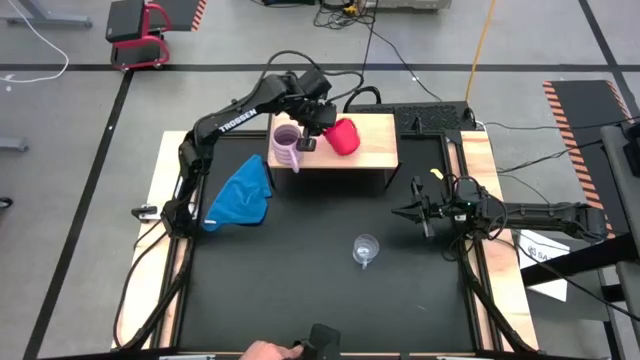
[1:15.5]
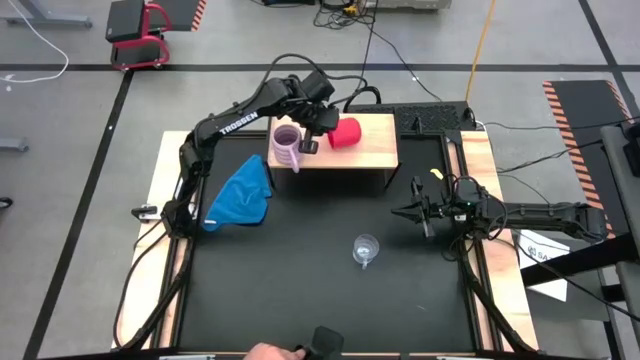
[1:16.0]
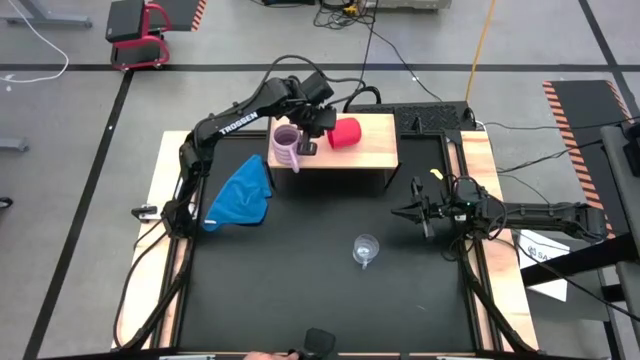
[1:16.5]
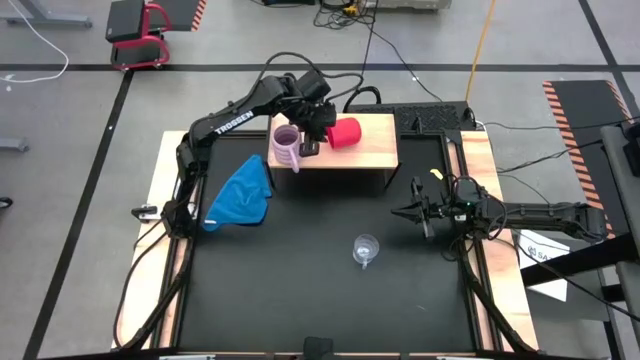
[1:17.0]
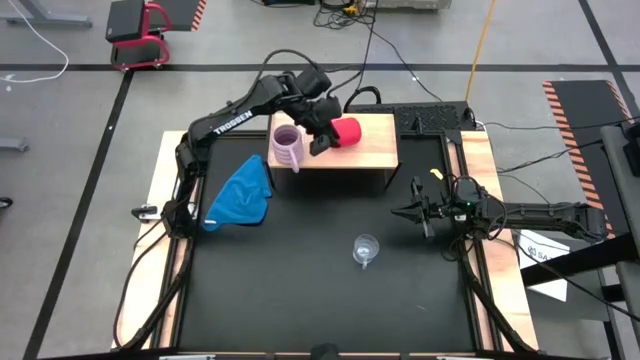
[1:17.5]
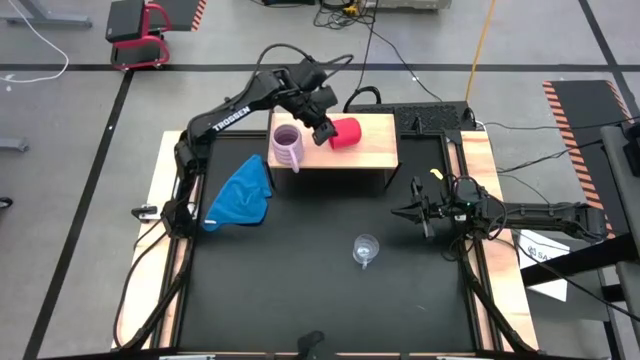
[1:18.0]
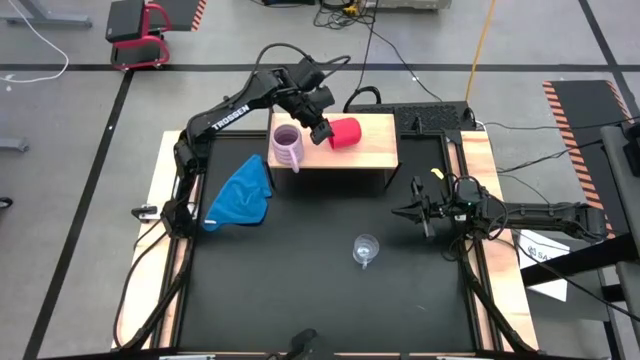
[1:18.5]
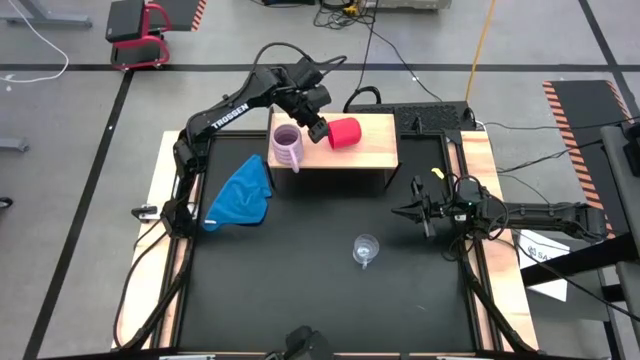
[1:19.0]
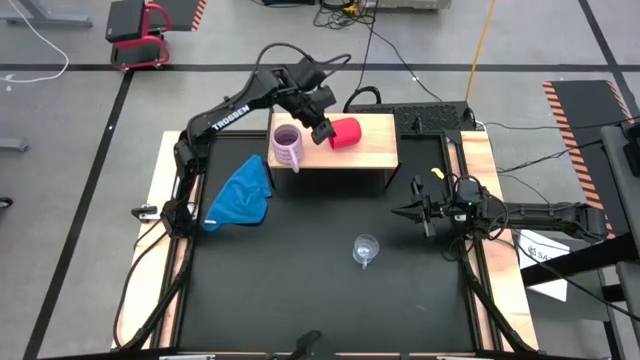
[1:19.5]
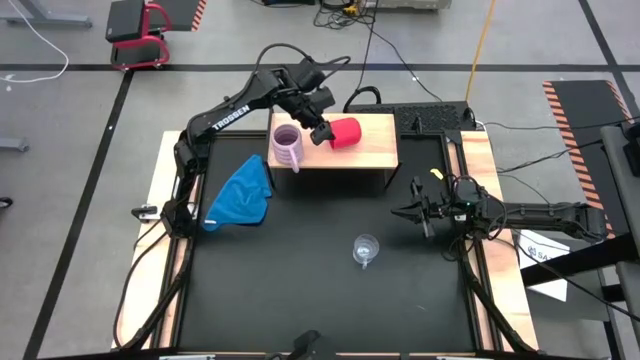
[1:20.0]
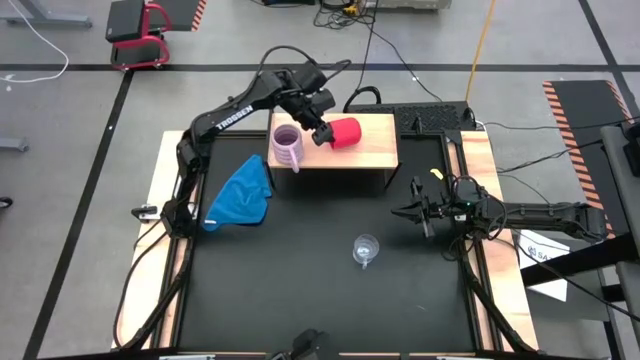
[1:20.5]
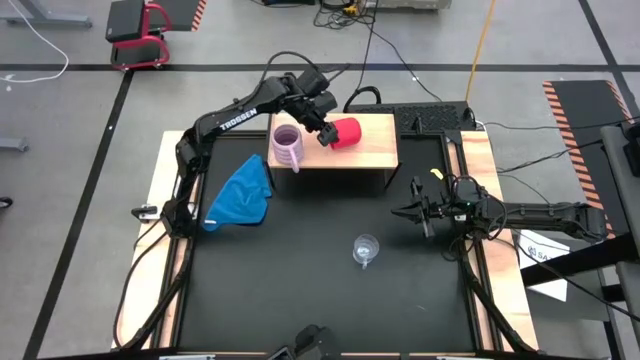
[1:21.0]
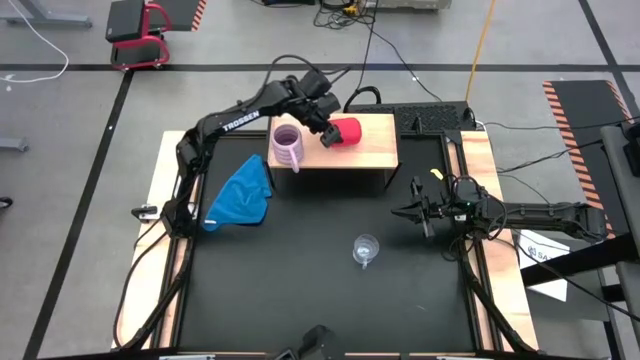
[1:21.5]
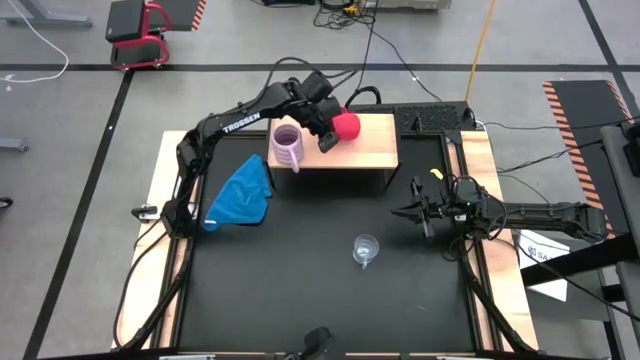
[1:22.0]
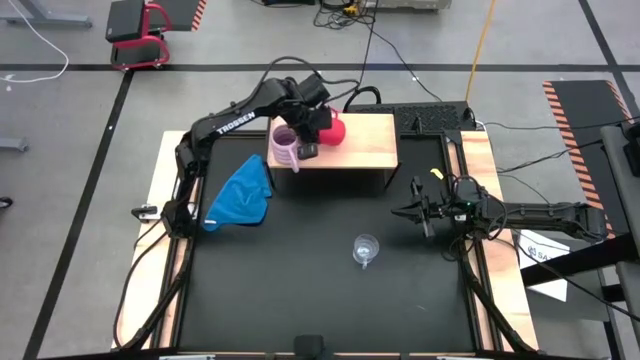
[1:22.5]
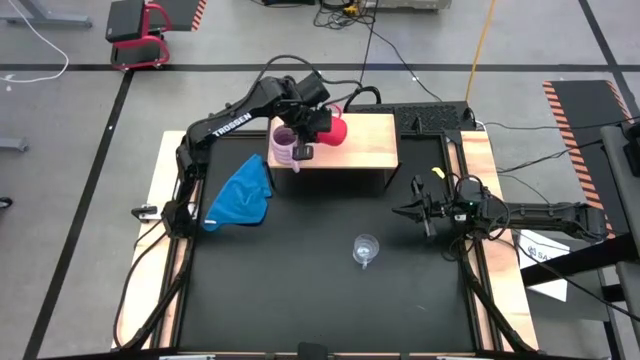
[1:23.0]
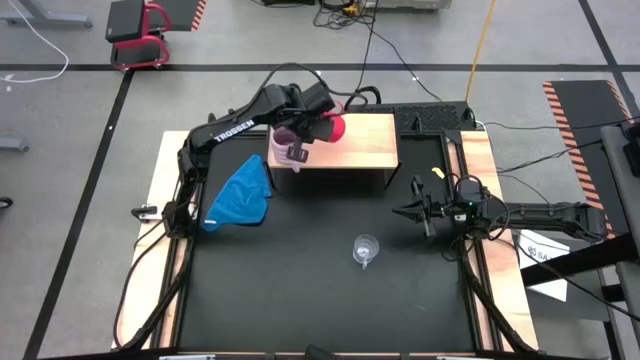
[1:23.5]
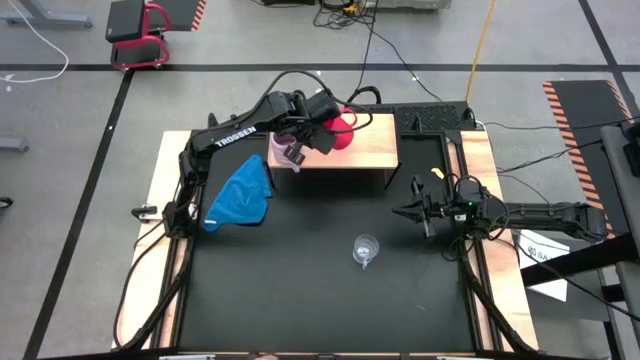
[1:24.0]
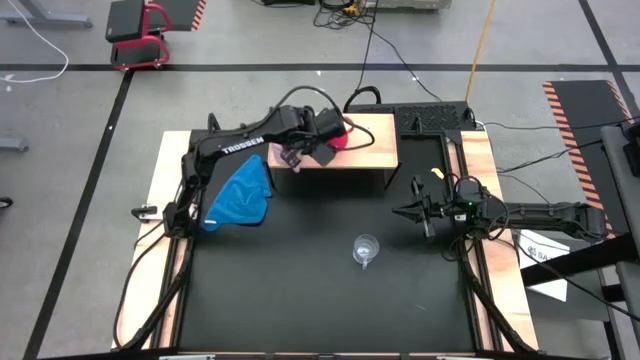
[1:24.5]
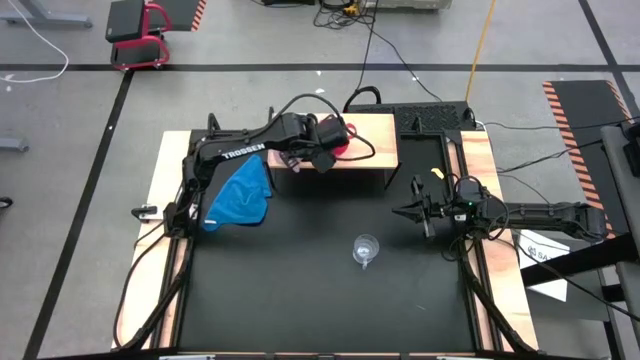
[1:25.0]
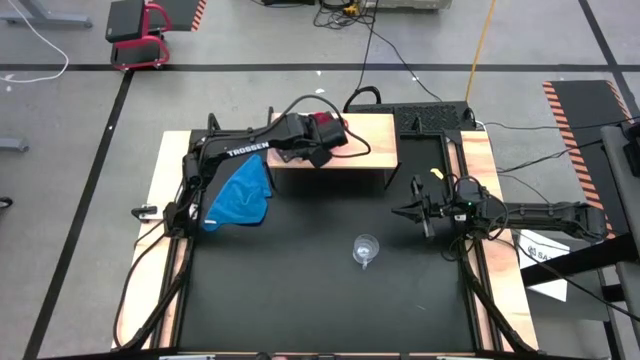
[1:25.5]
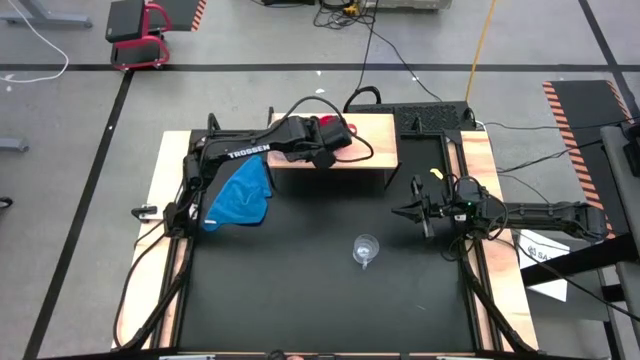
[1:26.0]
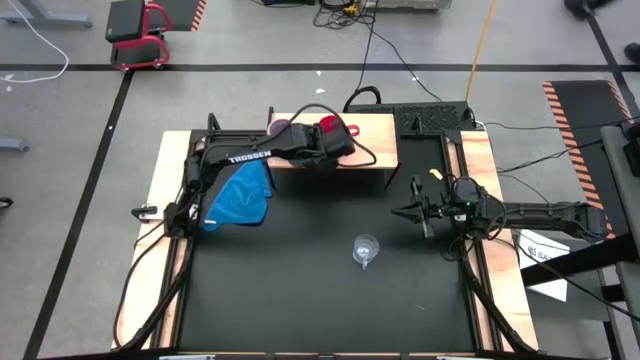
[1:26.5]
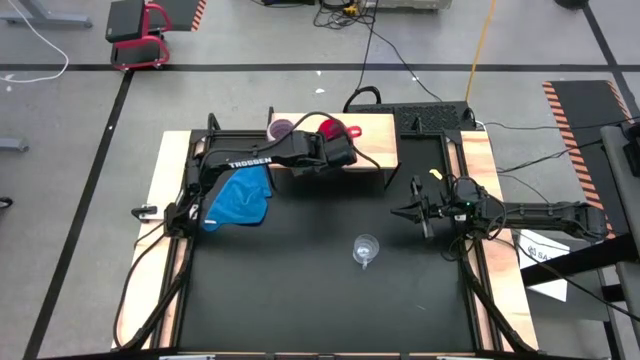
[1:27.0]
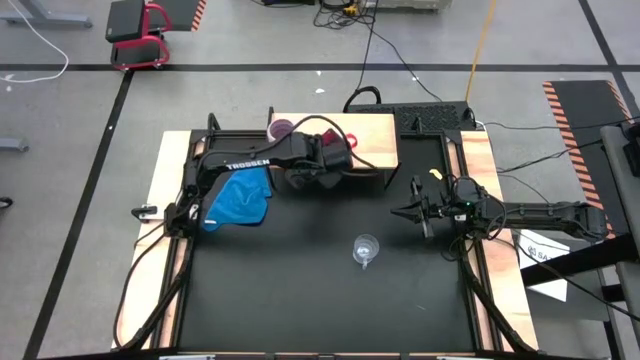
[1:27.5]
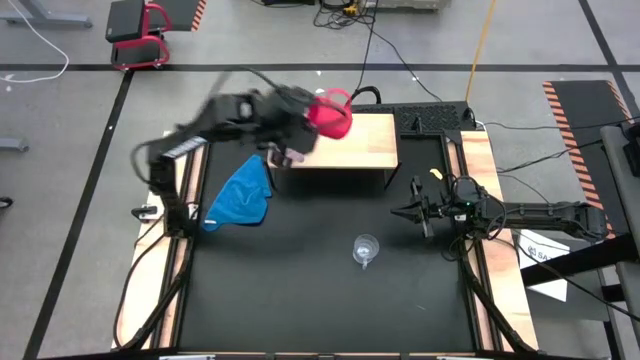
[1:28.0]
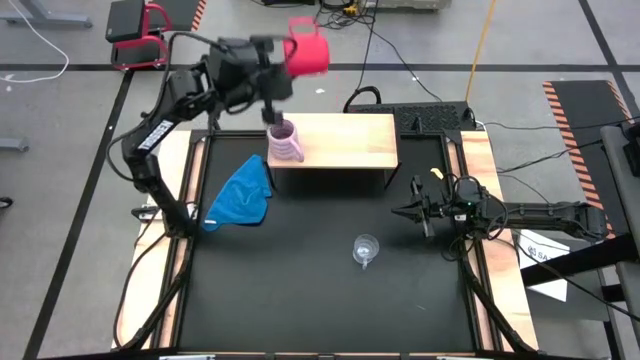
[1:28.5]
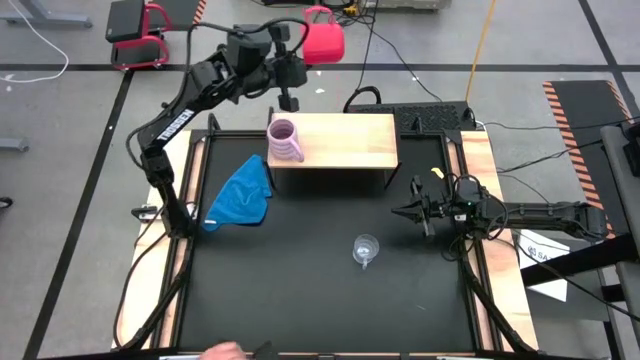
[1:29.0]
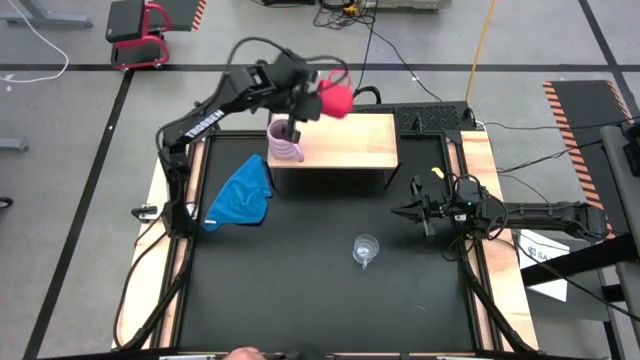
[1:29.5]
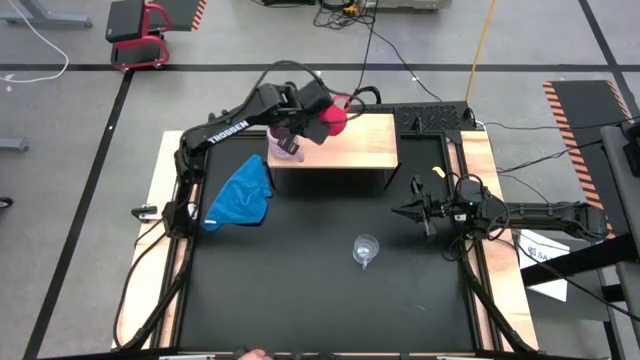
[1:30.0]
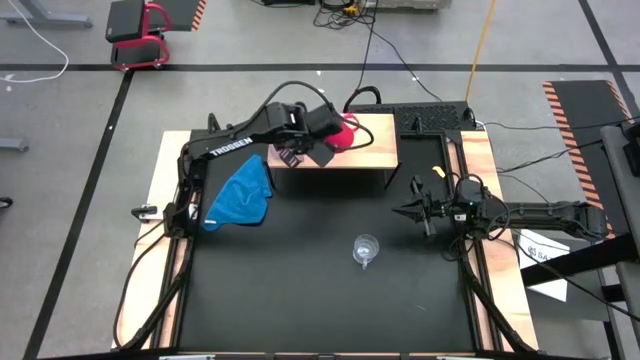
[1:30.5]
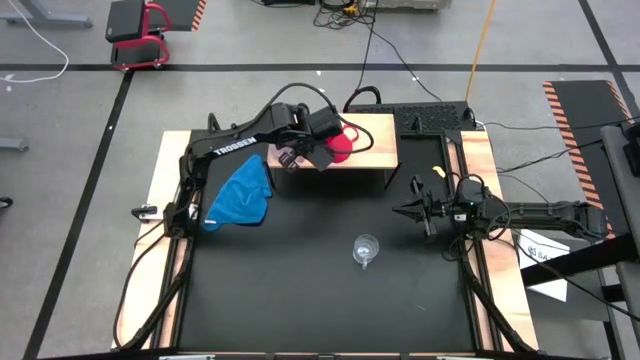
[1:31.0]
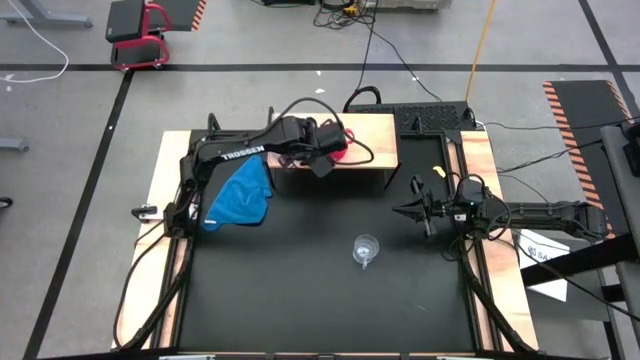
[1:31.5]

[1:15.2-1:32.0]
Task: Stack small to large cups/mugs on shelf
Put the red mug on the shelf

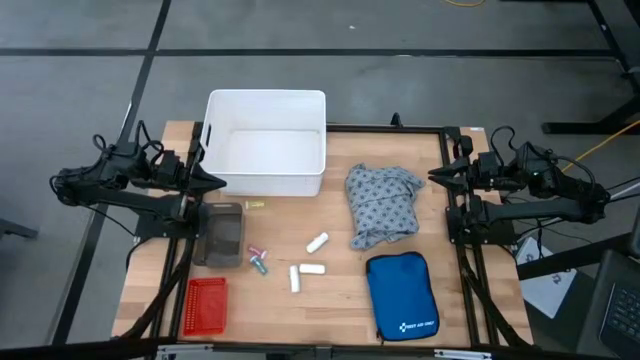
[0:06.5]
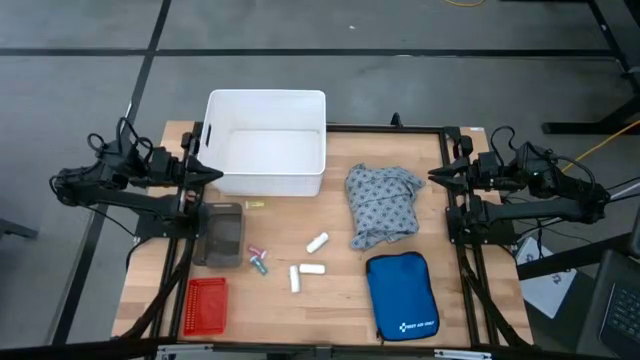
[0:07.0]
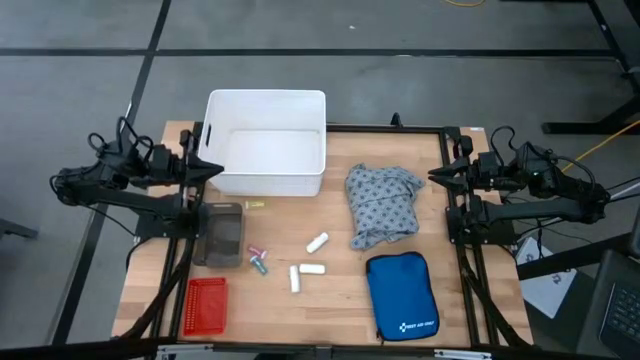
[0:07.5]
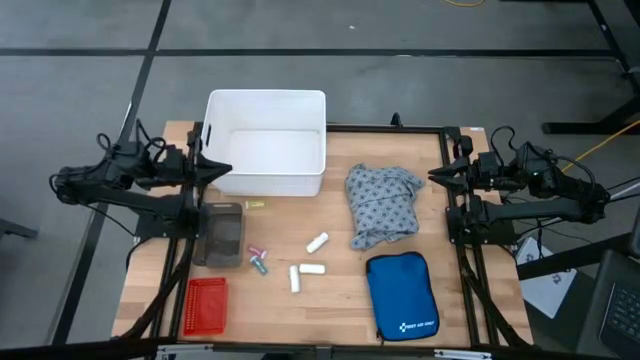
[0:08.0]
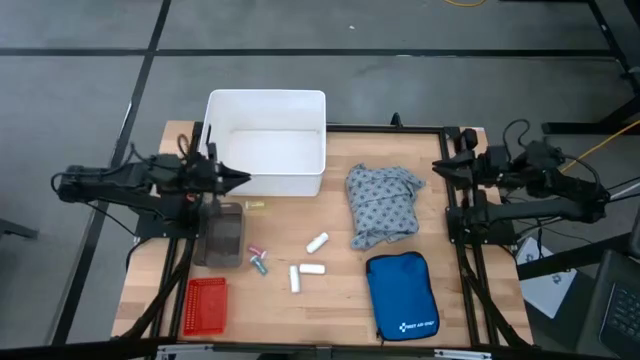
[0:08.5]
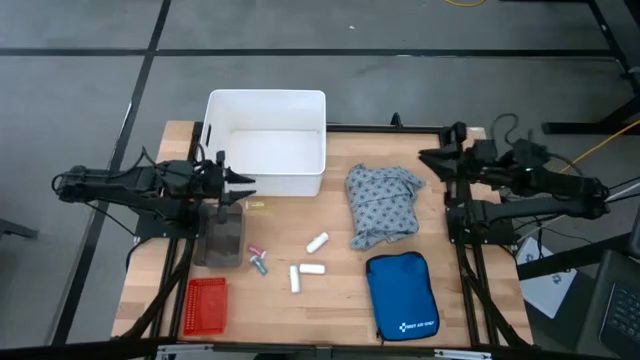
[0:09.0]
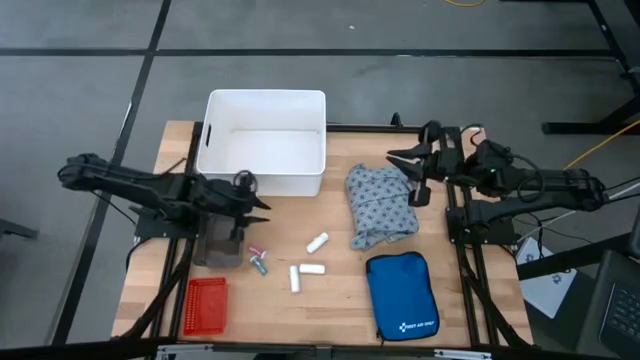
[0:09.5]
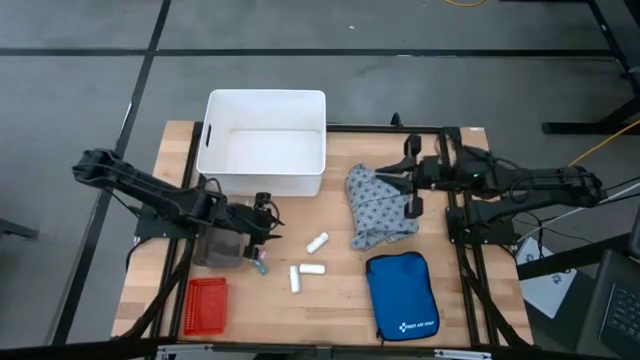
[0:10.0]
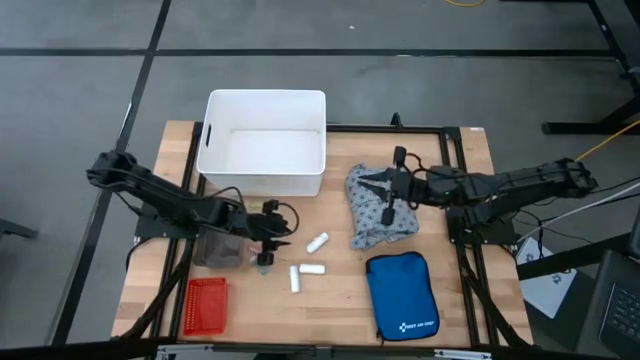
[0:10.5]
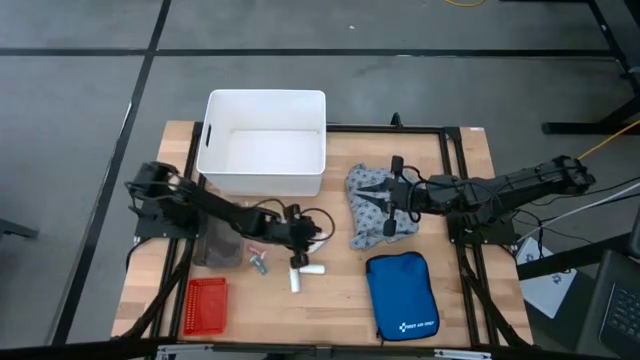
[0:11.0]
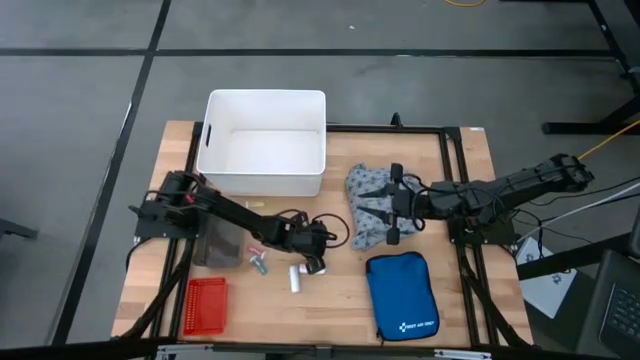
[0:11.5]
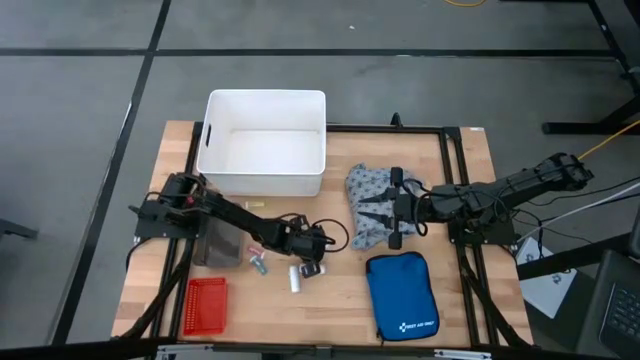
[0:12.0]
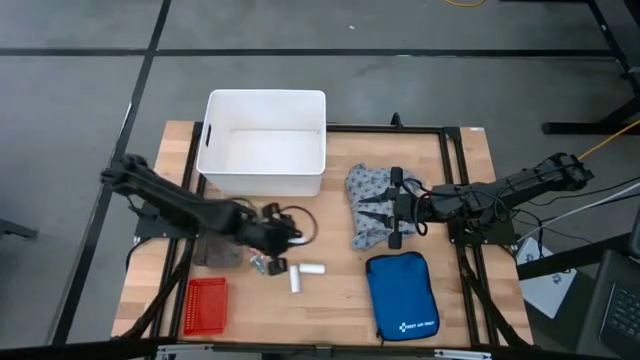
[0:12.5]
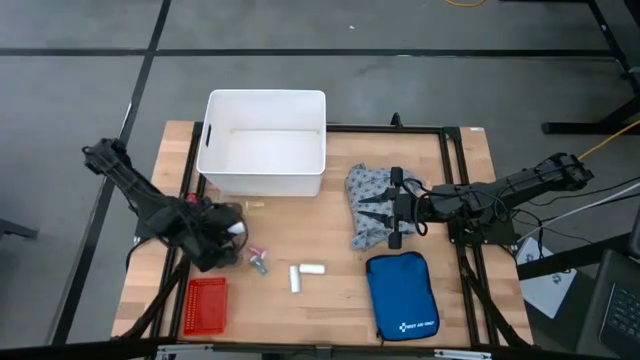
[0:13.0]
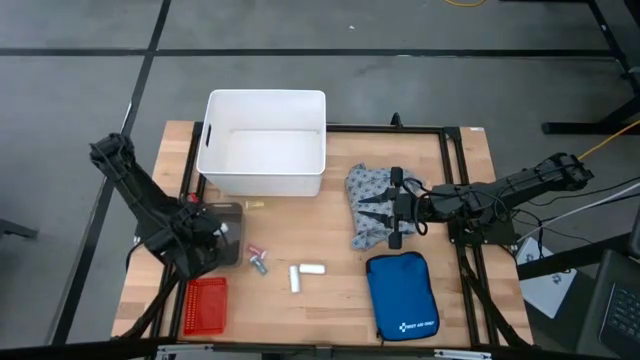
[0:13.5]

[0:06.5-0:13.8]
Task: Pick & place medical supplies in basket/bin
Put the top white bandage into the black bin
